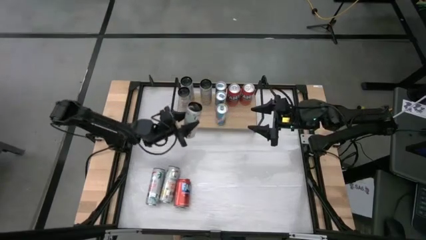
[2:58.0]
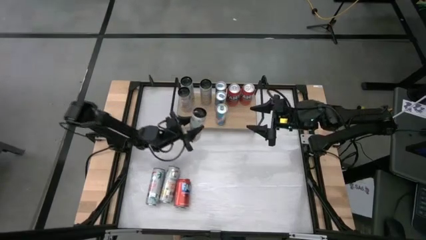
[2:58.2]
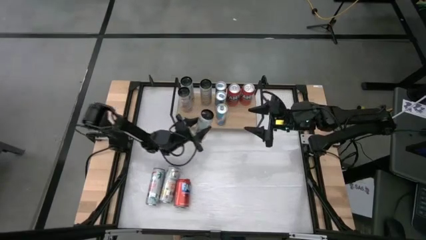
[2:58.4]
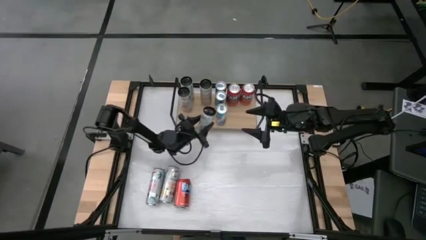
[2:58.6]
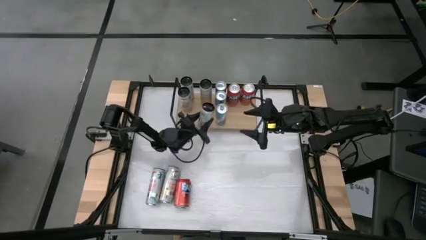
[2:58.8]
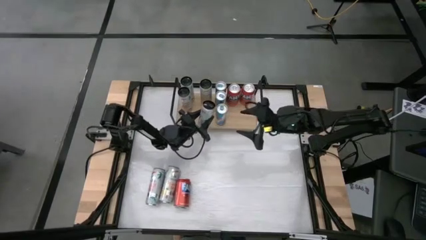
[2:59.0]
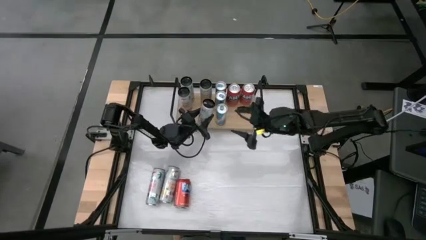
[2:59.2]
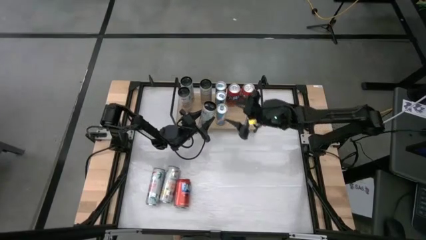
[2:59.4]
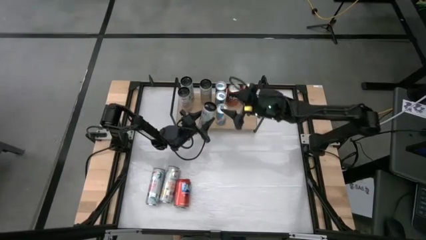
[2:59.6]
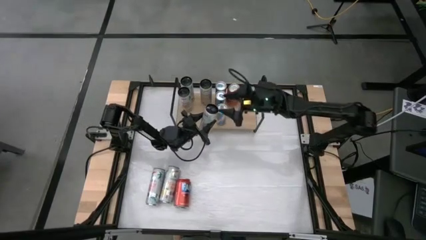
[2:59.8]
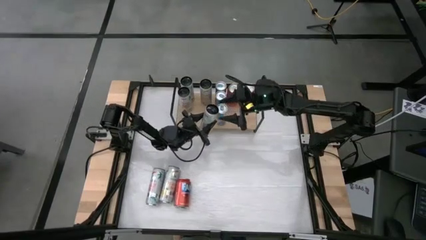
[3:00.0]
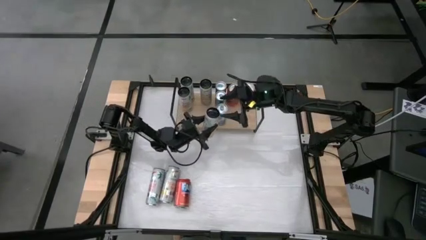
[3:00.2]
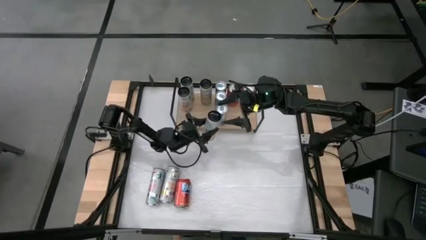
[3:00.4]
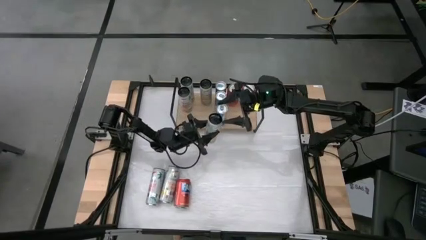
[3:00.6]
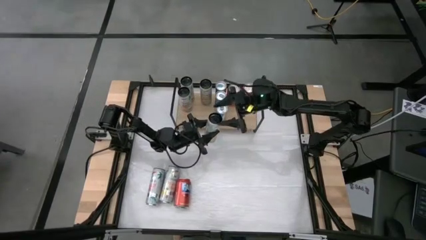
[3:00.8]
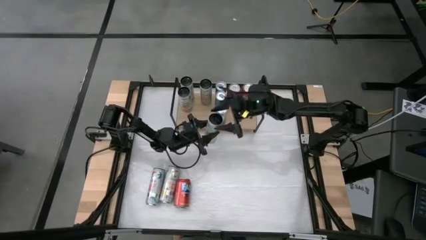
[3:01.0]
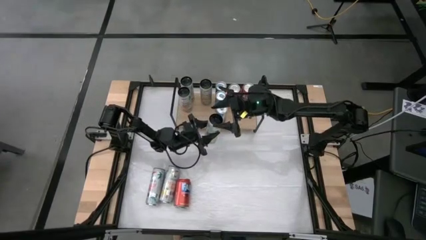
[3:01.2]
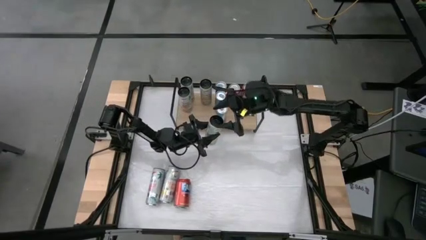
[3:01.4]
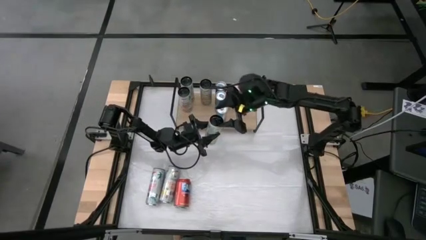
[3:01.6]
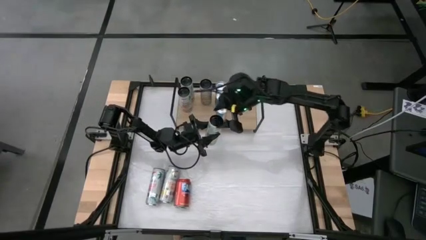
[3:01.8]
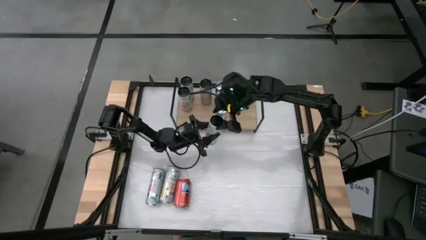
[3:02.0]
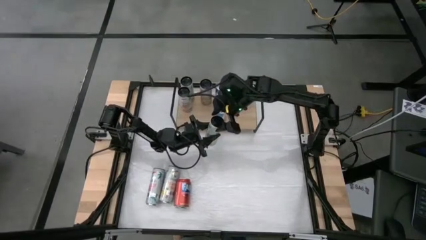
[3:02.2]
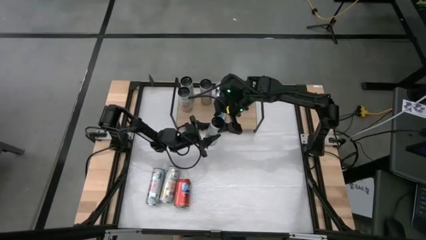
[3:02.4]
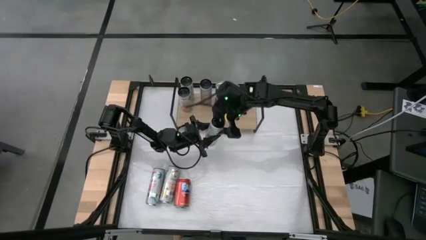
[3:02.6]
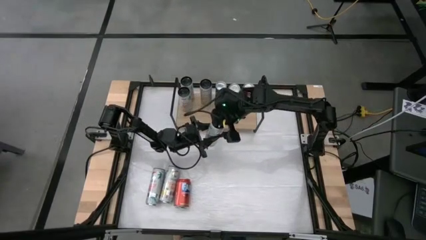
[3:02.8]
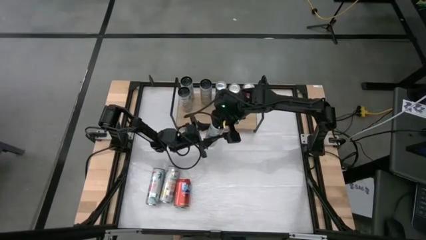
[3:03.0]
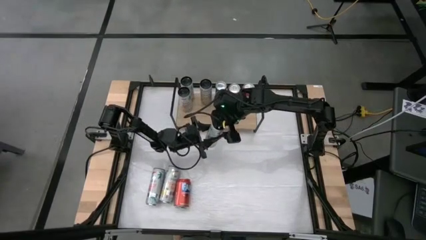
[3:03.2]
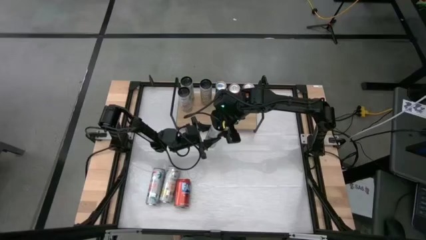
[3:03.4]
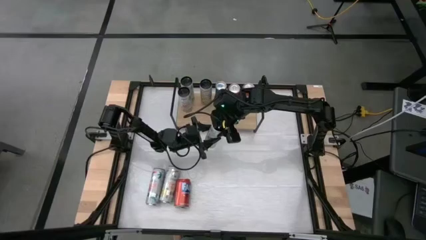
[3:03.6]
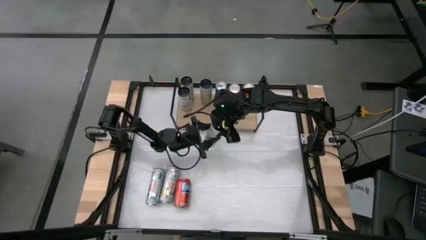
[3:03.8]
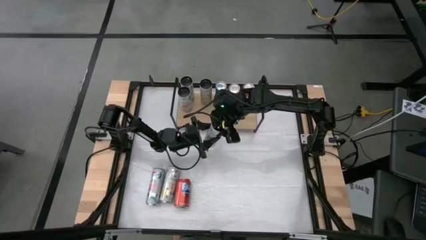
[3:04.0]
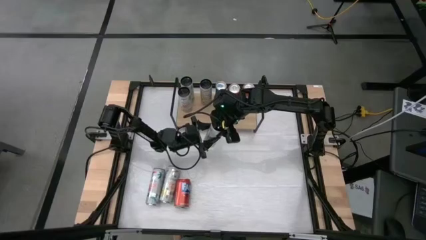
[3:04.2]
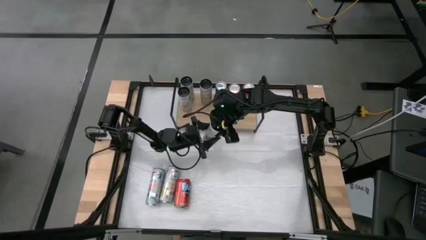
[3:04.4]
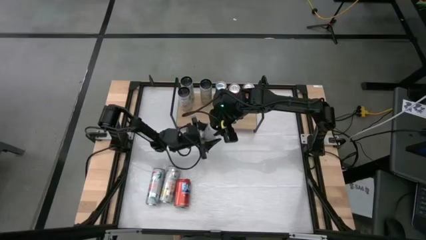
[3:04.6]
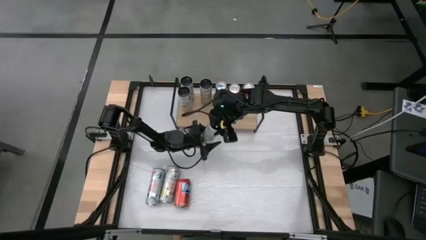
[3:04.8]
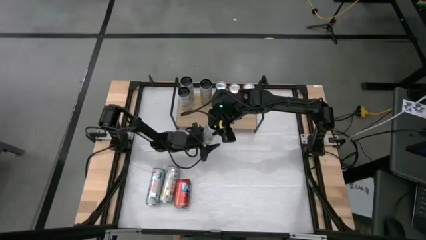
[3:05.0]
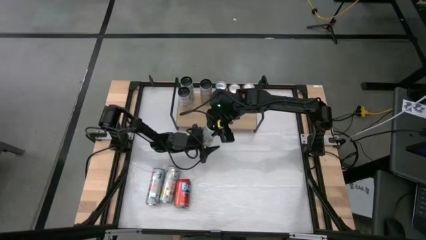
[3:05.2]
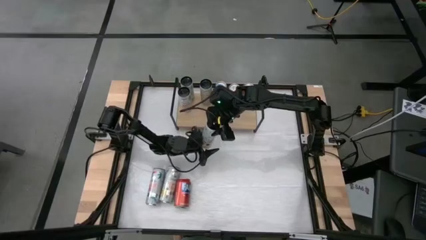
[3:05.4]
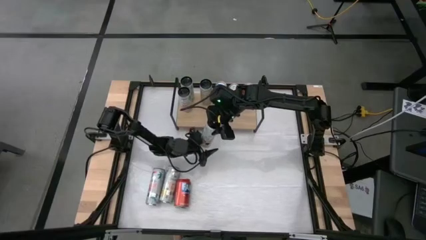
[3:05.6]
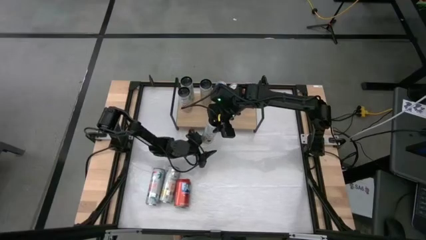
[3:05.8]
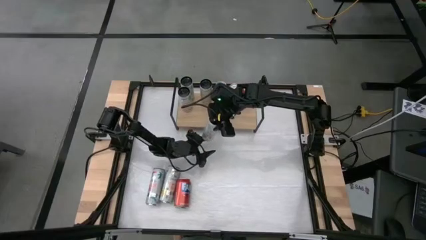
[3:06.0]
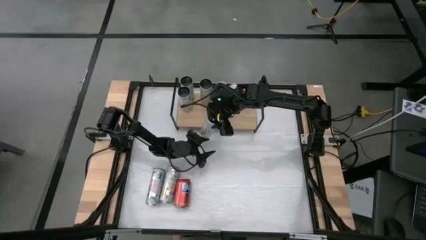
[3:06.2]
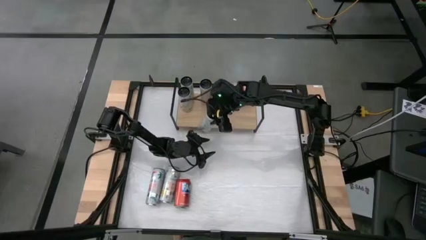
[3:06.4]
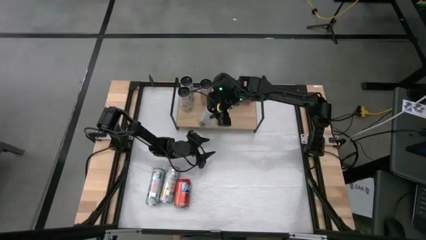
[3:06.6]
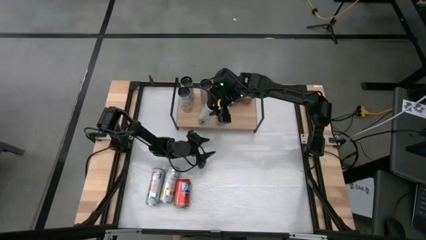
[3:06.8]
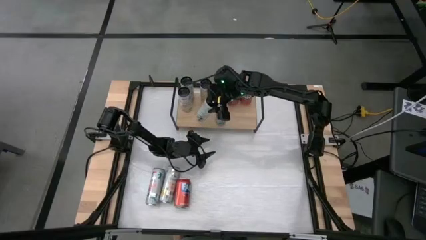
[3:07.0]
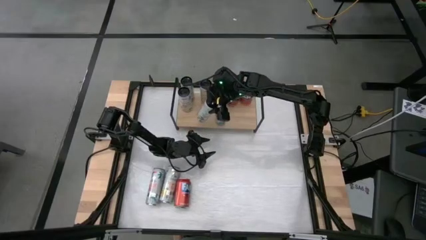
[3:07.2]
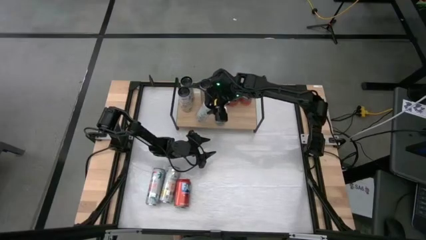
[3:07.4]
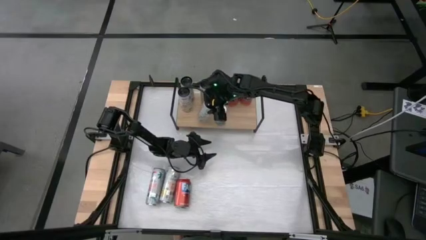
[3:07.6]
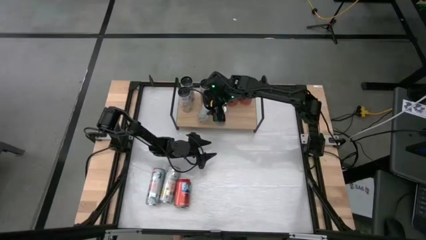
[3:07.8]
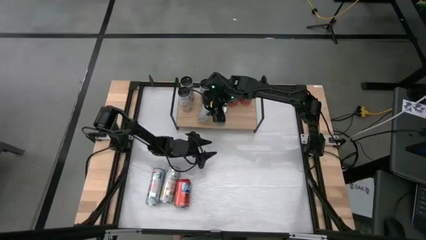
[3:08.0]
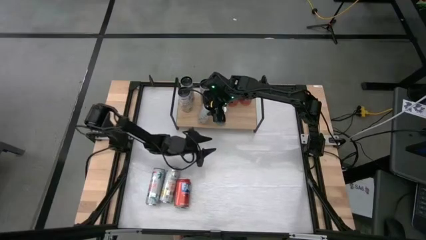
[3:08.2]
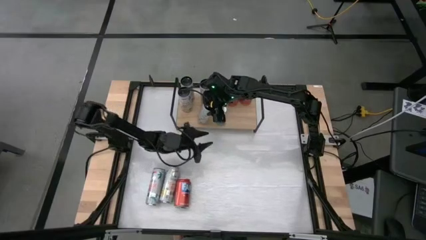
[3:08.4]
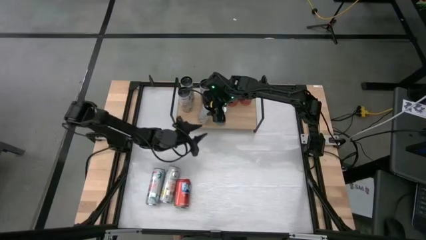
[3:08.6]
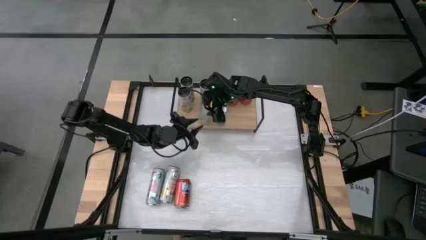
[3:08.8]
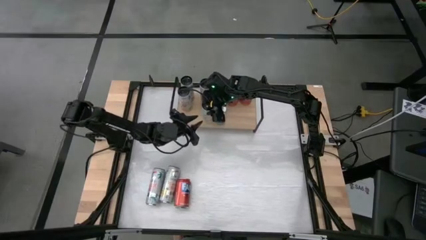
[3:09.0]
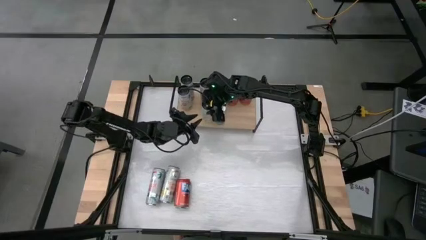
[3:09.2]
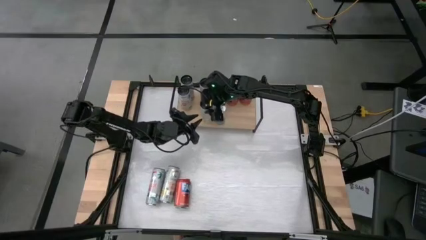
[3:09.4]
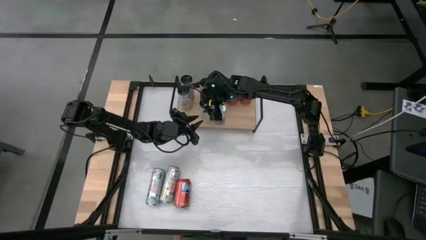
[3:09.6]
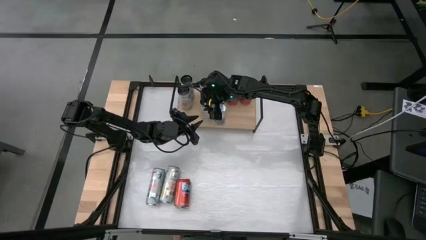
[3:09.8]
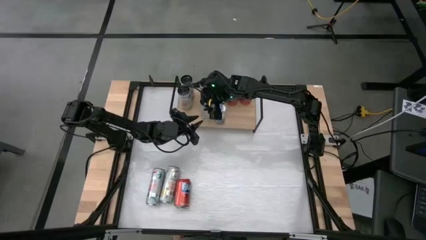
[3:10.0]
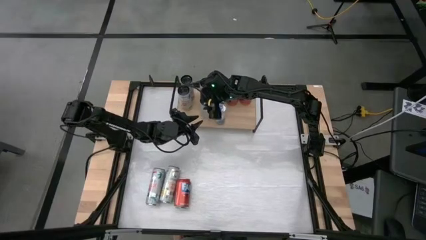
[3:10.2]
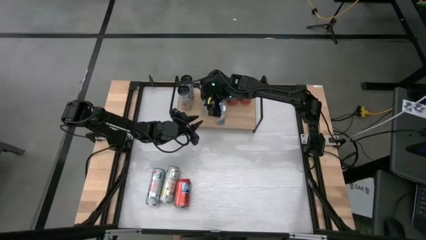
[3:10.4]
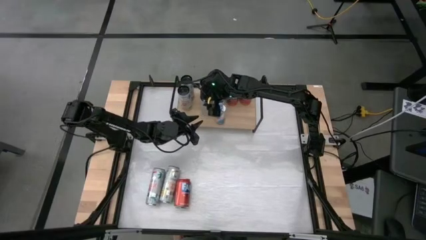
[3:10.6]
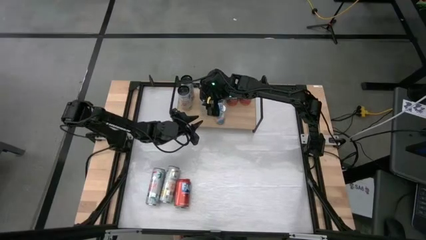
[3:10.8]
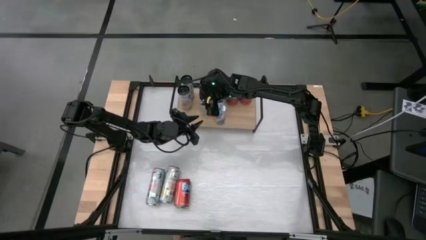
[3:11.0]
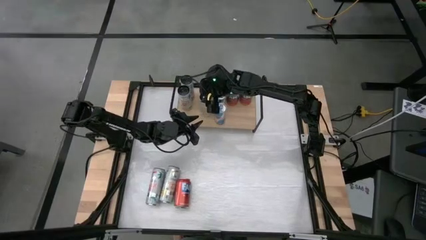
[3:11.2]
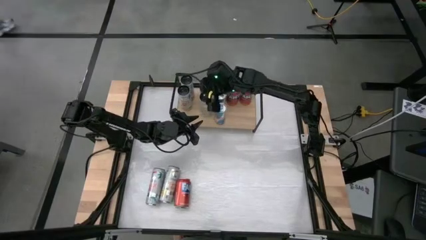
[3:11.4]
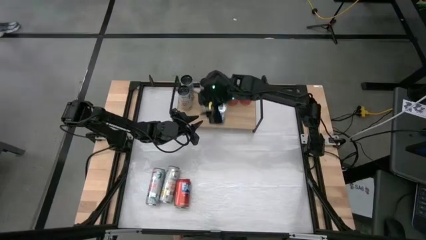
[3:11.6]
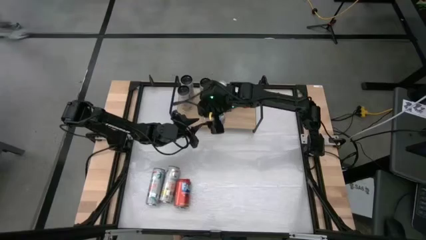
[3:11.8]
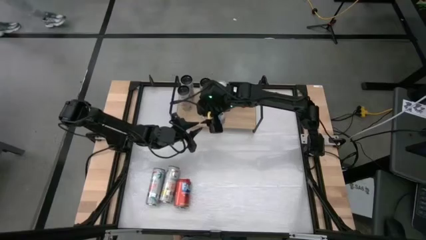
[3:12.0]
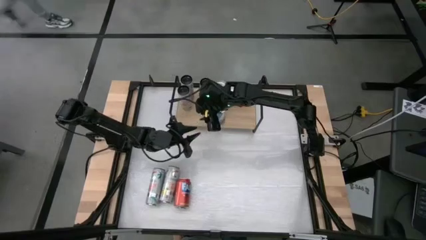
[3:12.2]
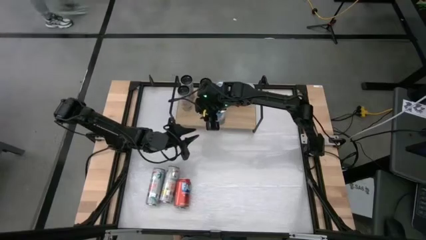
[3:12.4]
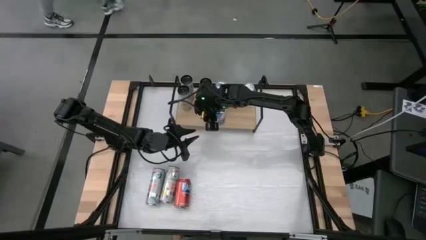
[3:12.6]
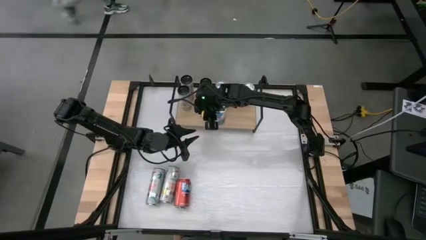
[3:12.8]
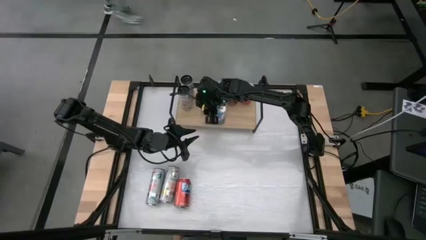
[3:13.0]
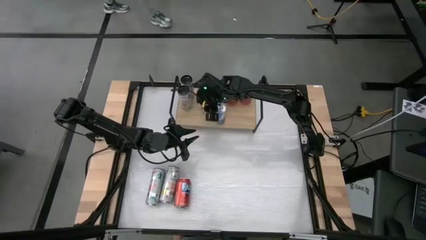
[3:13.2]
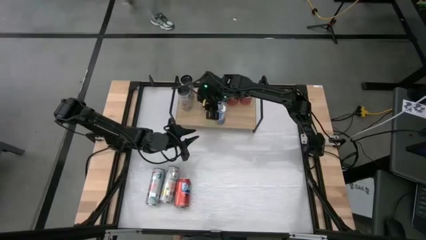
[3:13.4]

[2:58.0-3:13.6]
Task: Place canned beverage on shelf
Put the top white yellow soda can on the shelf aligned with the other white yellow soda can
